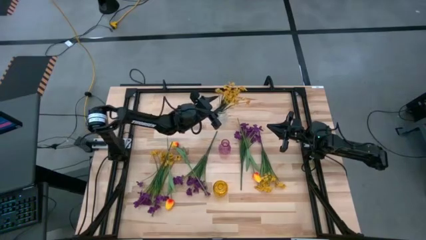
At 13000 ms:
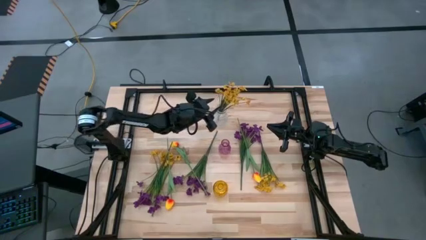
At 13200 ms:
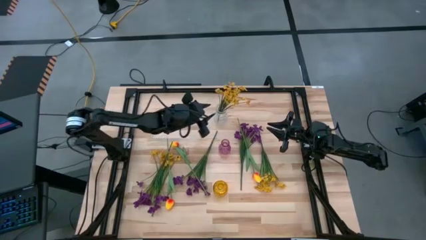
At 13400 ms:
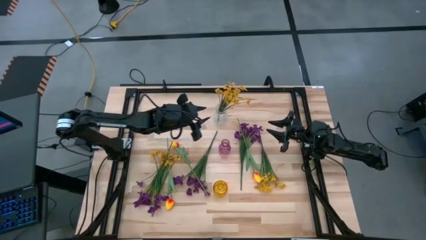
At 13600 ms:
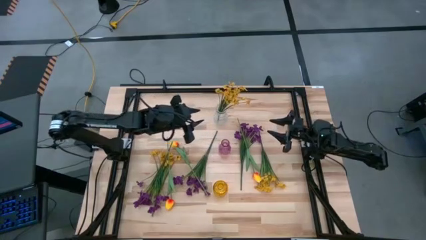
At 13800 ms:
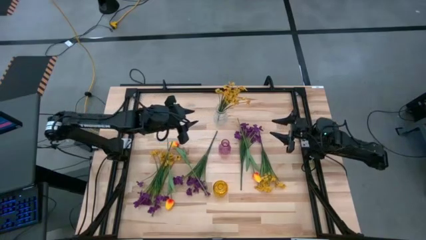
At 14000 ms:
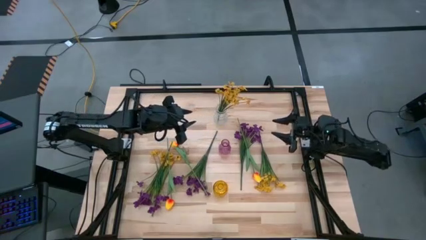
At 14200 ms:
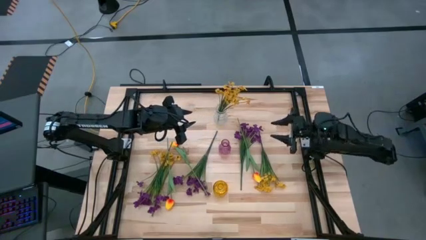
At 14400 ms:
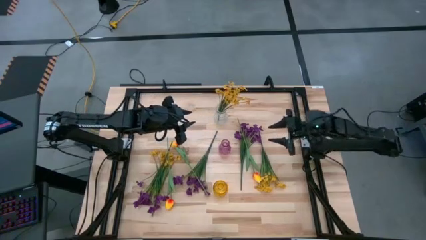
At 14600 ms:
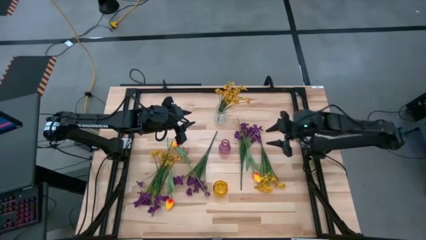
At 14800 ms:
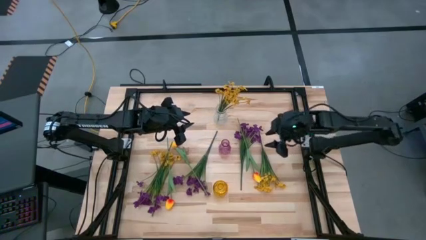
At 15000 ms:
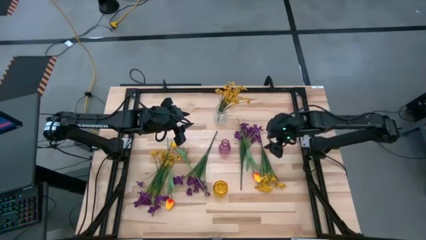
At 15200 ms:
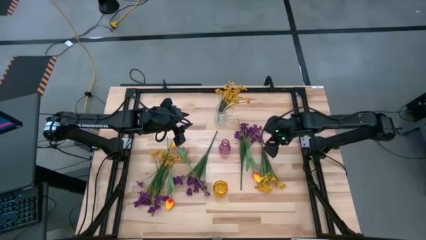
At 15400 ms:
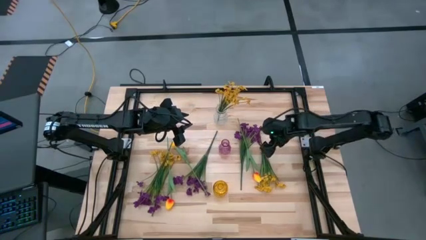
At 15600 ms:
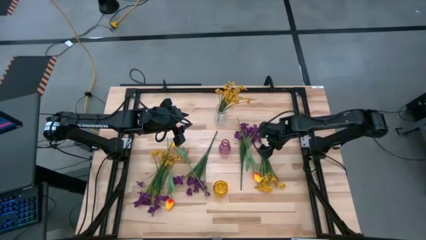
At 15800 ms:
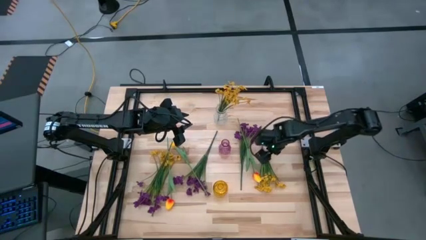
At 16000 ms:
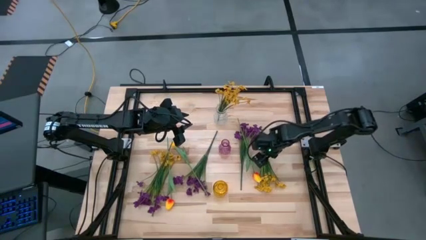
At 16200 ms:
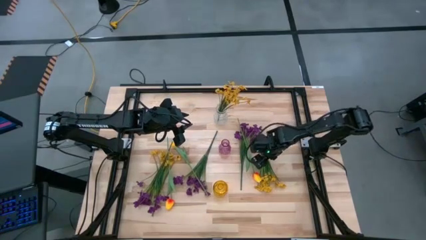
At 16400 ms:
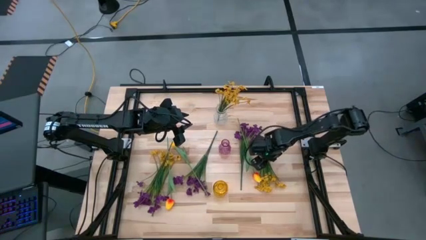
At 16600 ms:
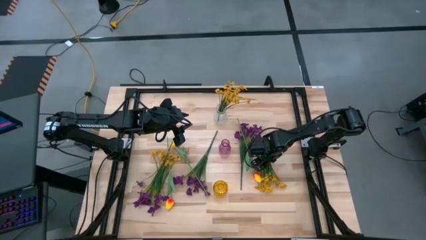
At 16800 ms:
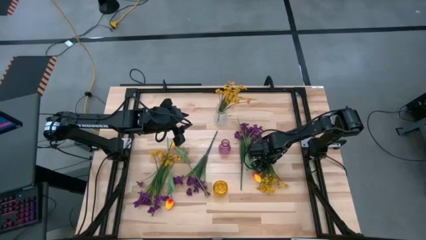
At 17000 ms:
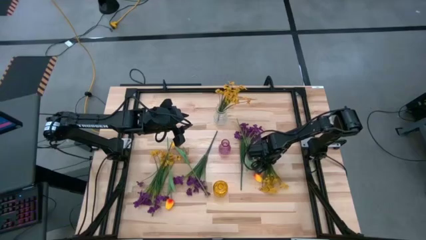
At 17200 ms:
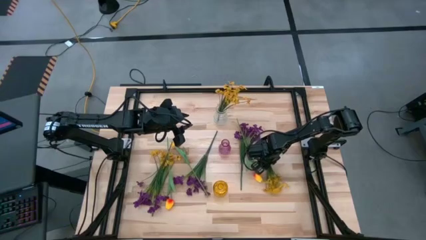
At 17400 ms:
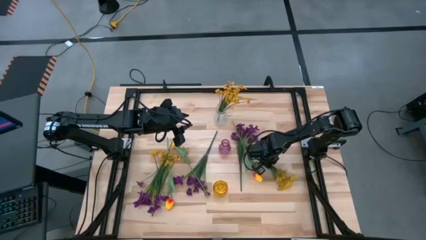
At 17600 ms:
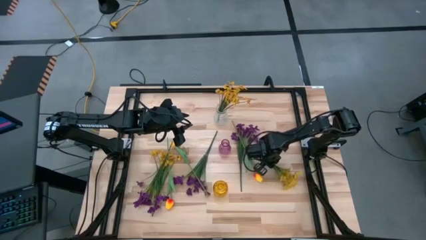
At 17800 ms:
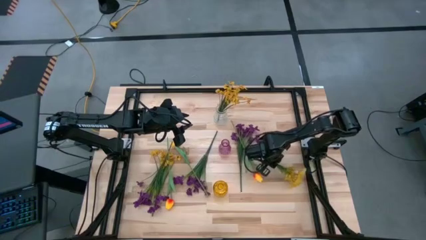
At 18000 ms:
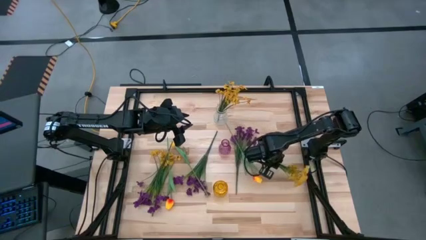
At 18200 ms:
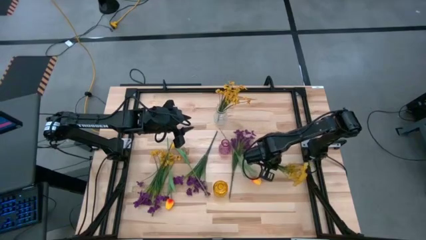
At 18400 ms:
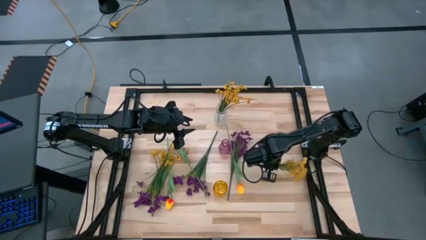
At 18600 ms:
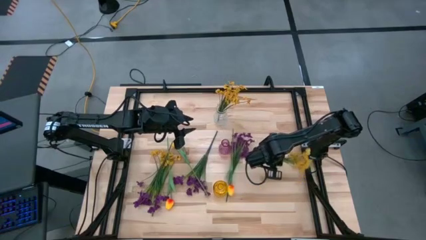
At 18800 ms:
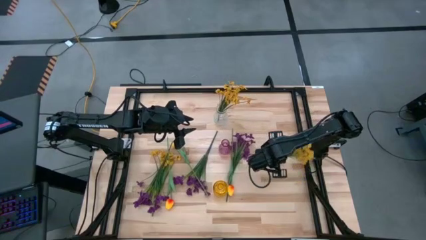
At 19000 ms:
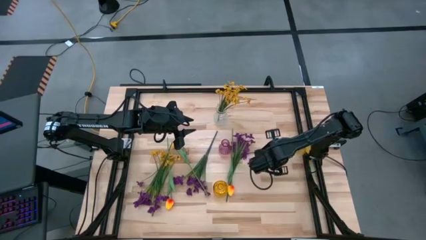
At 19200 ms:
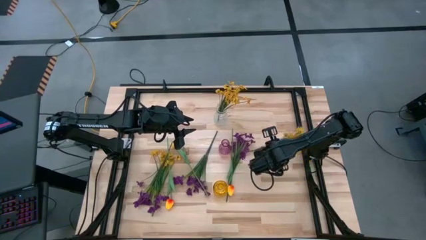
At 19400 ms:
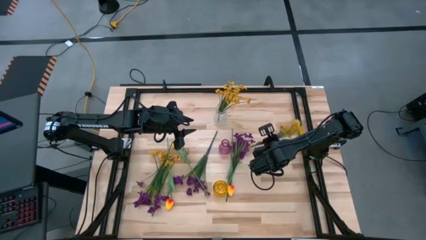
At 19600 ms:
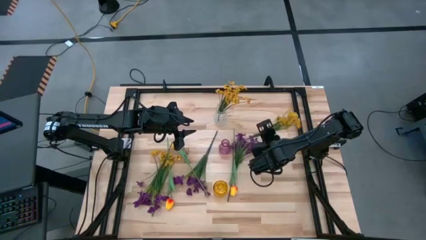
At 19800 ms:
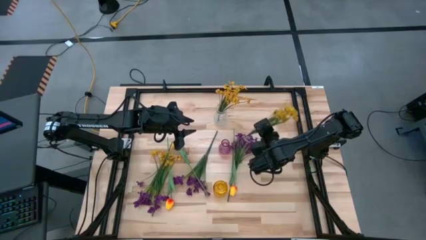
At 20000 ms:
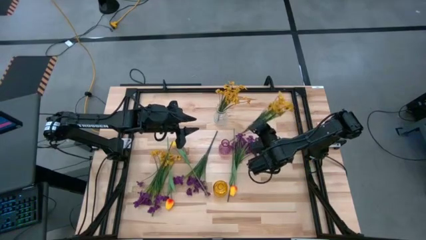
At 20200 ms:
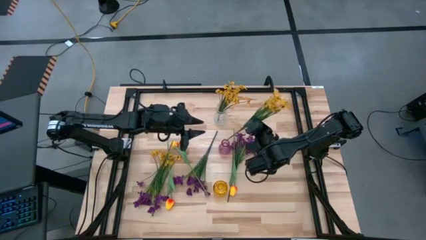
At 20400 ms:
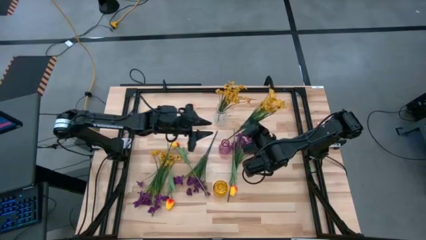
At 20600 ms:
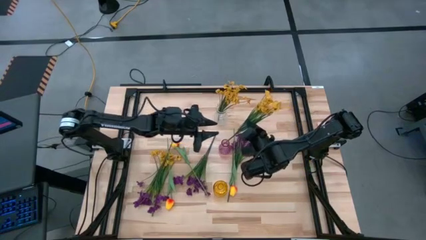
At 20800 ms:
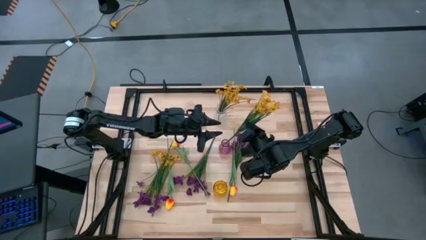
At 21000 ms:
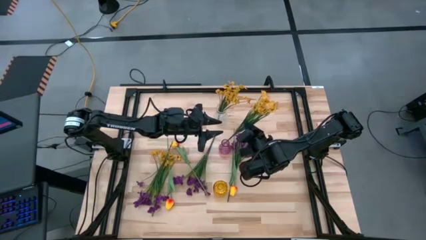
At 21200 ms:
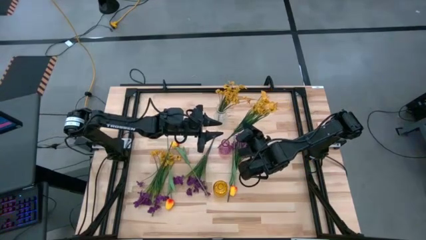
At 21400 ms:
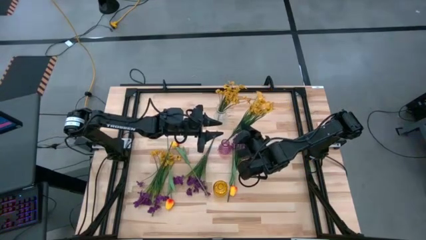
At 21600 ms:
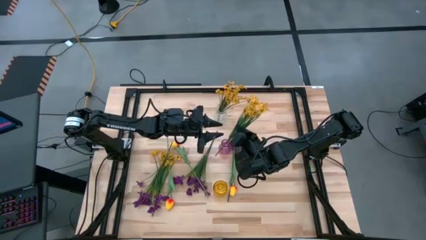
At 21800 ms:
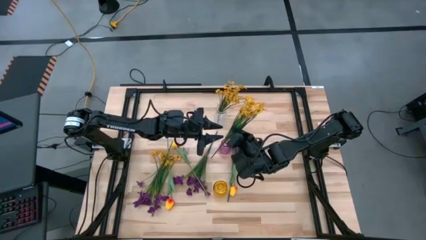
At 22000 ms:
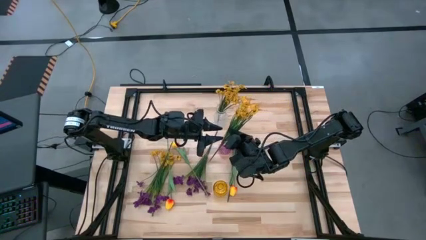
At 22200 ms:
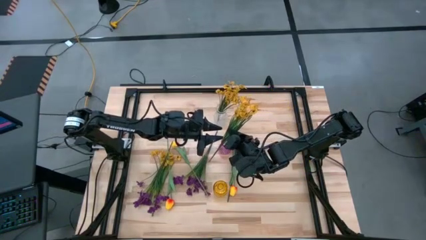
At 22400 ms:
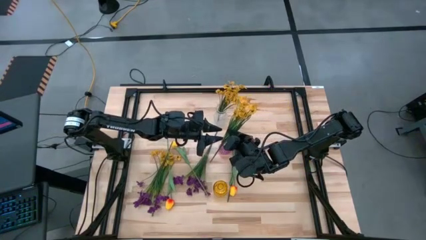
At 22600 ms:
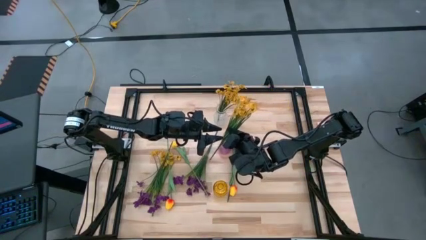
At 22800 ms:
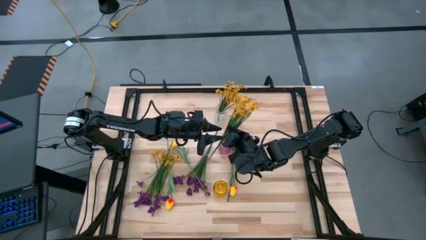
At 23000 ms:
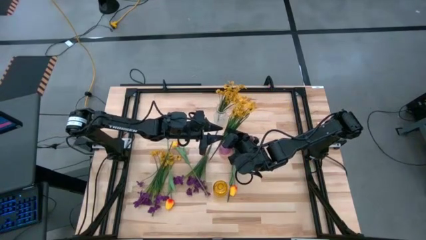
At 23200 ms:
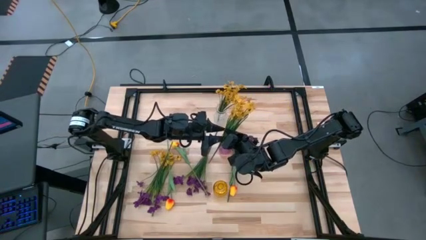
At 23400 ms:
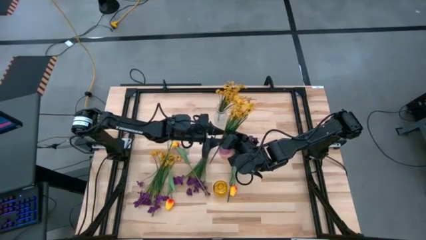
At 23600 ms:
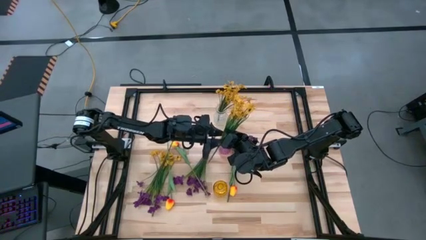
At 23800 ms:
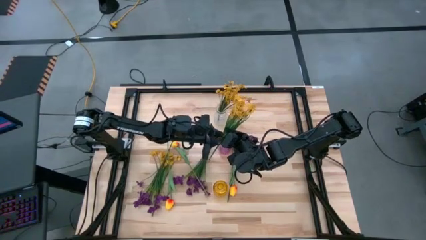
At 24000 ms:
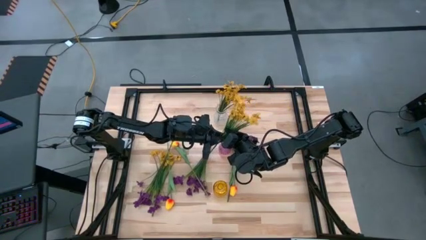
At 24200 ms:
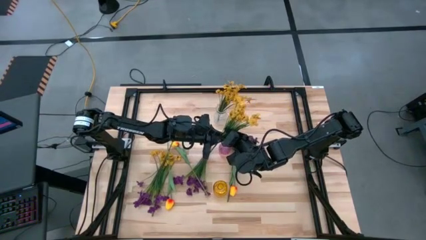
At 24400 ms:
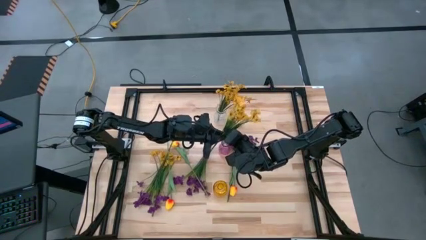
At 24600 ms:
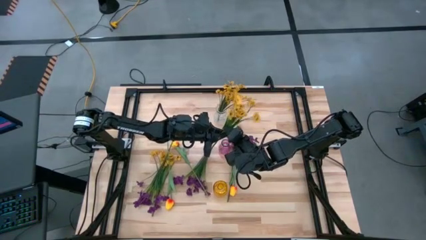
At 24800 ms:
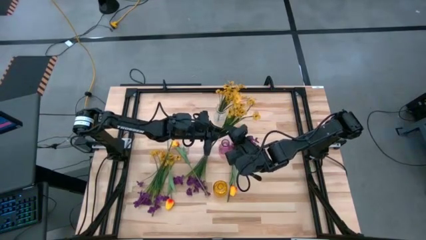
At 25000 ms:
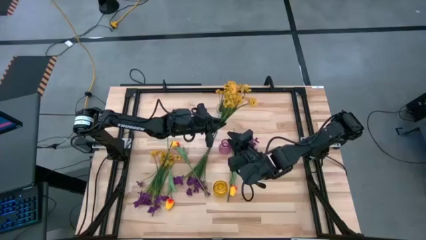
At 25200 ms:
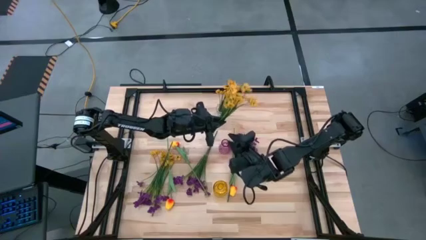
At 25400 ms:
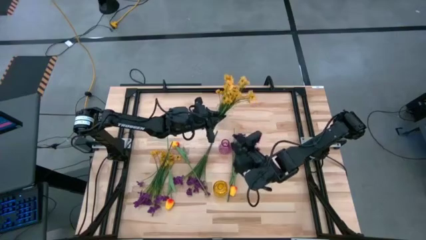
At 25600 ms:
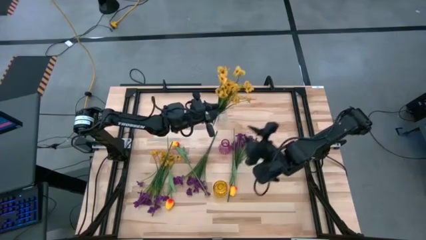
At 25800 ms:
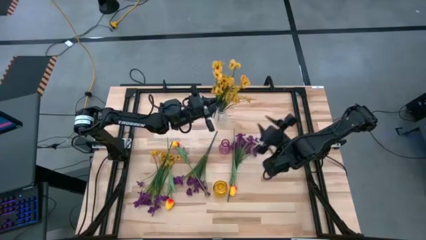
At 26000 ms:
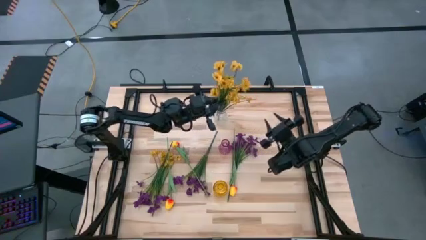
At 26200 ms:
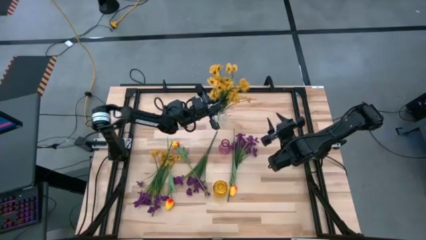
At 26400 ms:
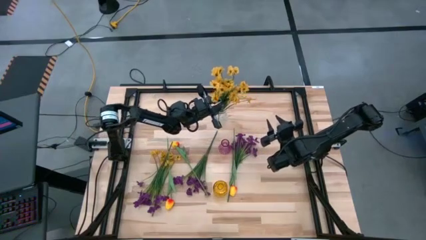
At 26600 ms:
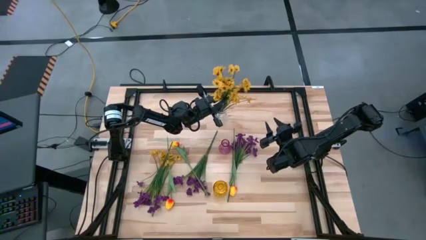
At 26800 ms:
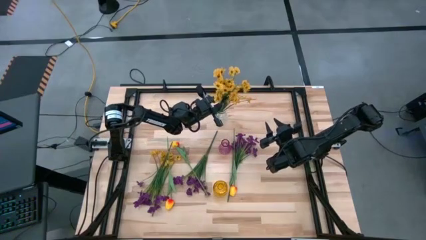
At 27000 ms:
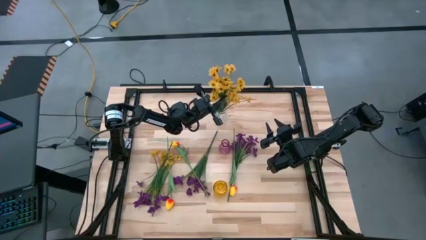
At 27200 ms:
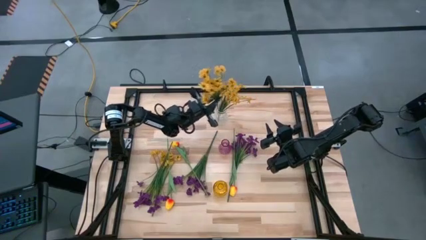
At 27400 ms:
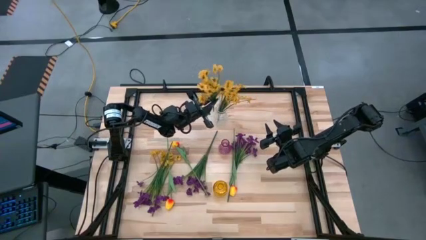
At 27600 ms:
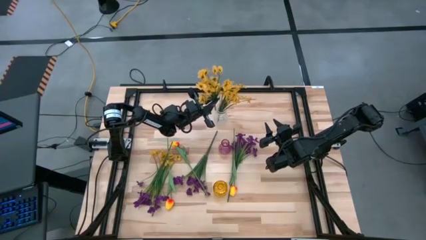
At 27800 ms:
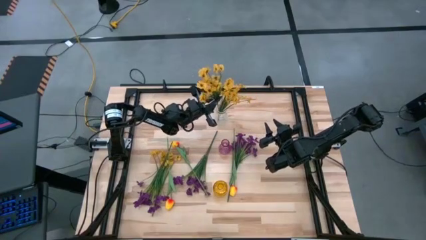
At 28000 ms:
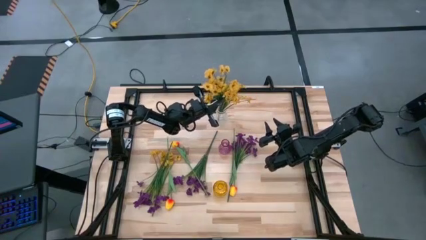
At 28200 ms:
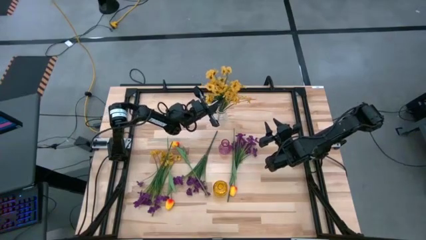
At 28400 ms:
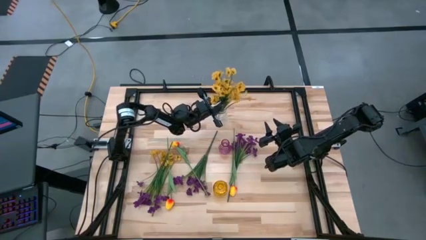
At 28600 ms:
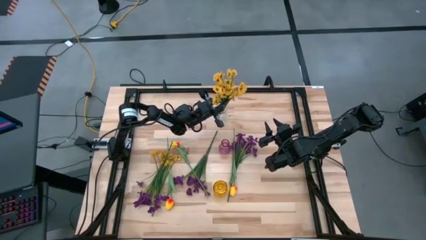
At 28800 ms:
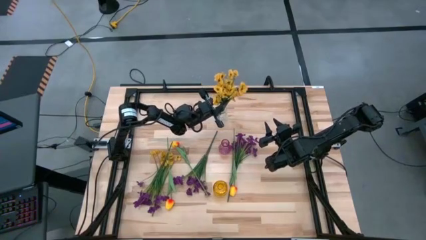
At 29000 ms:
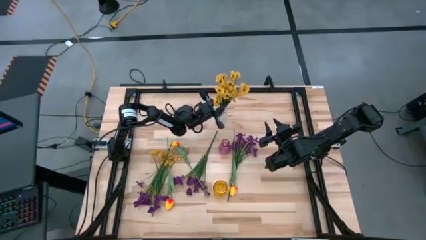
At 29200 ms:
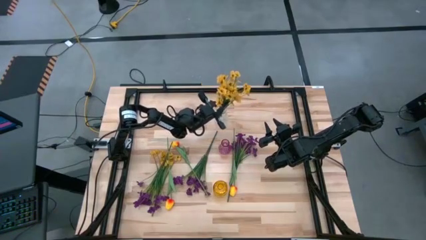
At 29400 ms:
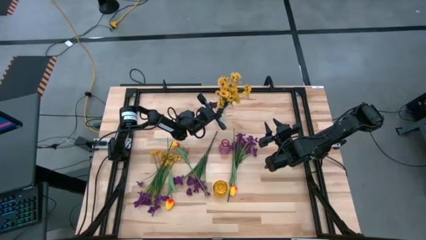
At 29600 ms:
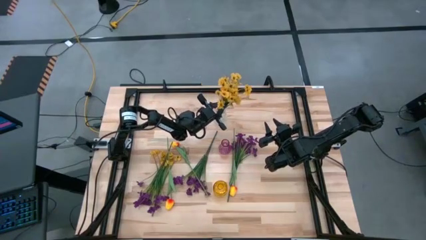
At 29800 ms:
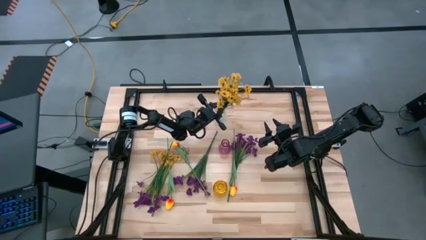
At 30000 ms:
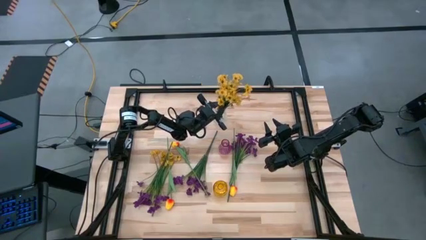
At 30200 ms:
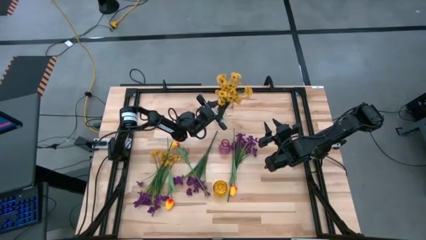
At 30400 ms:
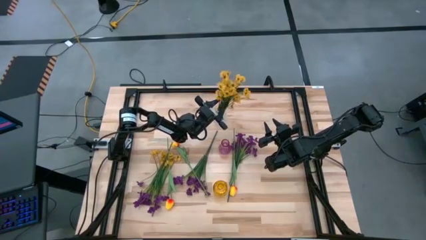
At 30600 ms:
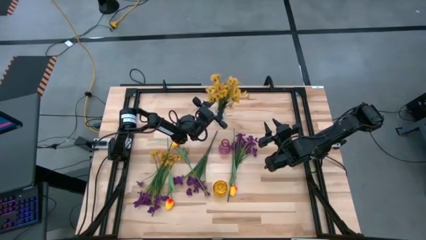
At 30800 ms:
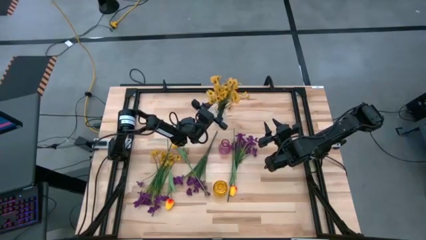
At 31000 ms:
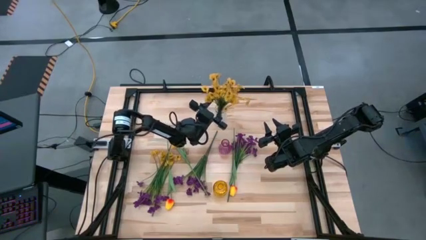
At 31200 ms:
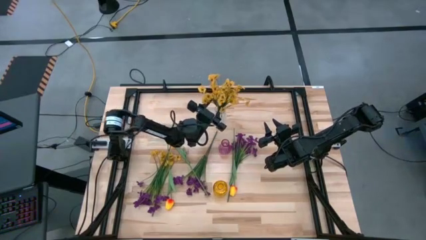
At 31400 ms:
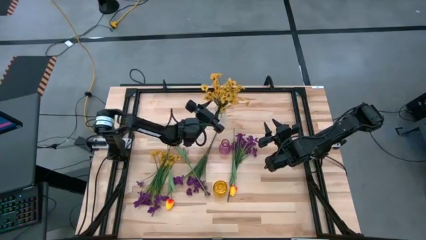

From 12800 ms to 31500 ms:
Task: Sort flowers into vase by color
Put the right yellow flowers into the transparent vase
